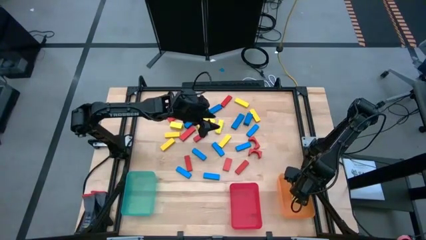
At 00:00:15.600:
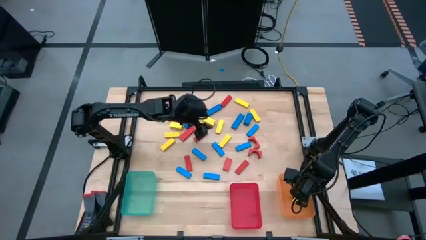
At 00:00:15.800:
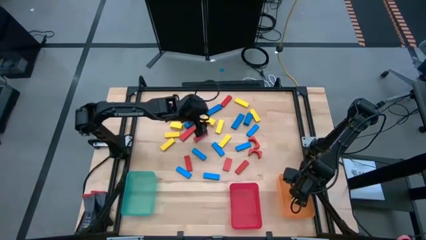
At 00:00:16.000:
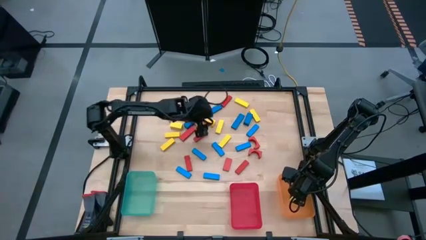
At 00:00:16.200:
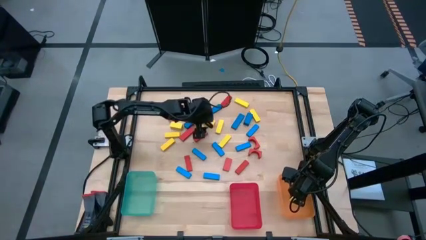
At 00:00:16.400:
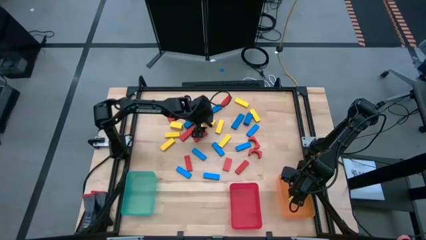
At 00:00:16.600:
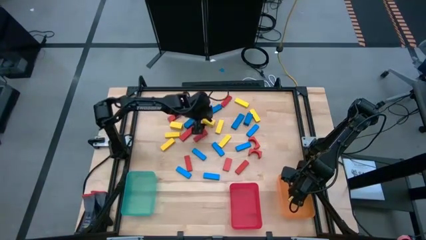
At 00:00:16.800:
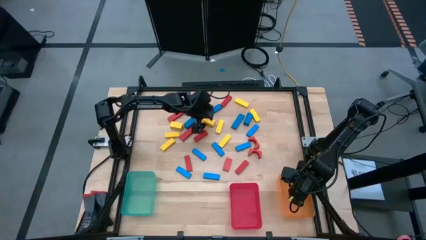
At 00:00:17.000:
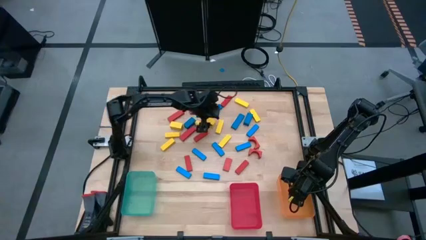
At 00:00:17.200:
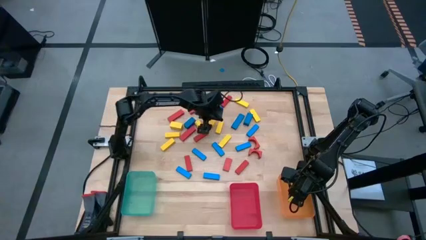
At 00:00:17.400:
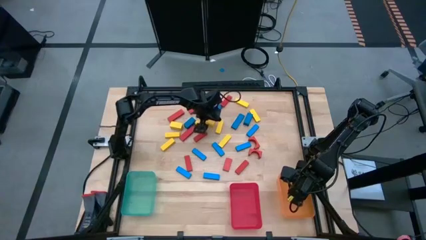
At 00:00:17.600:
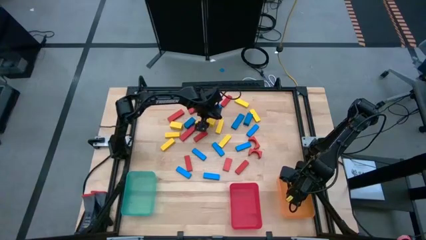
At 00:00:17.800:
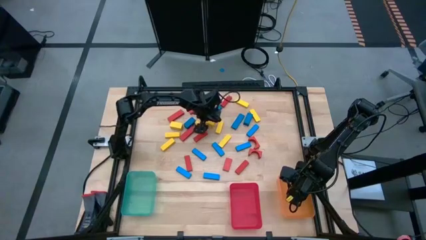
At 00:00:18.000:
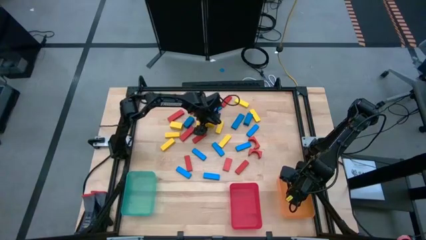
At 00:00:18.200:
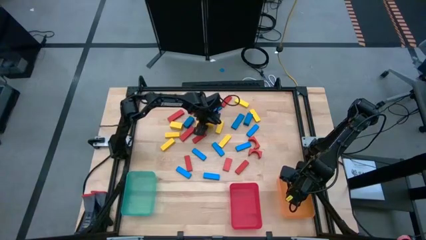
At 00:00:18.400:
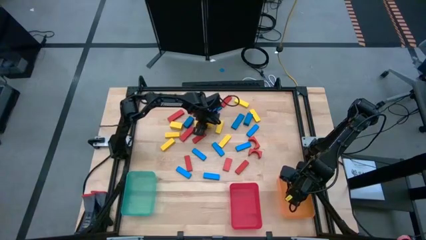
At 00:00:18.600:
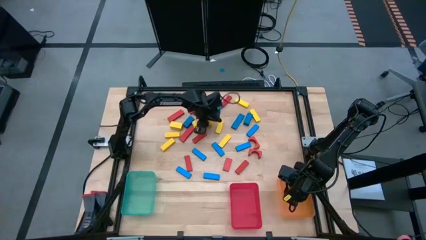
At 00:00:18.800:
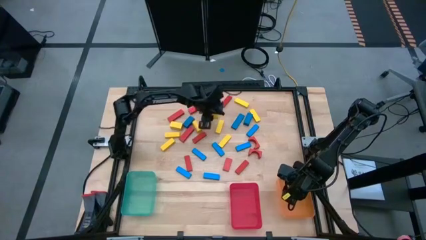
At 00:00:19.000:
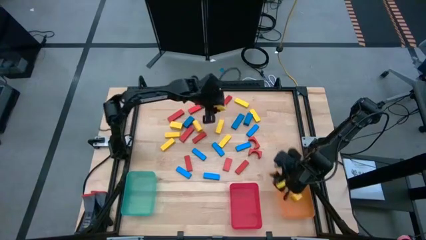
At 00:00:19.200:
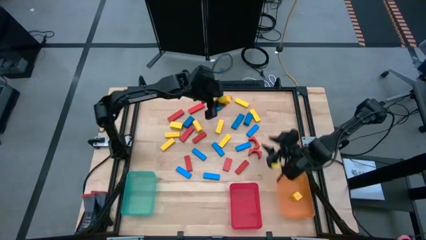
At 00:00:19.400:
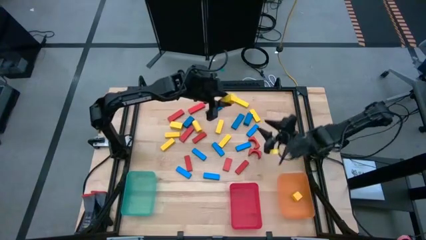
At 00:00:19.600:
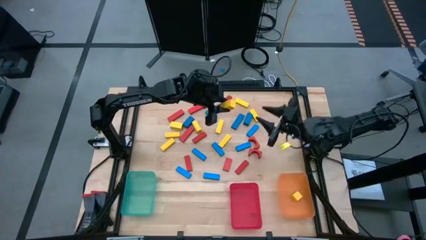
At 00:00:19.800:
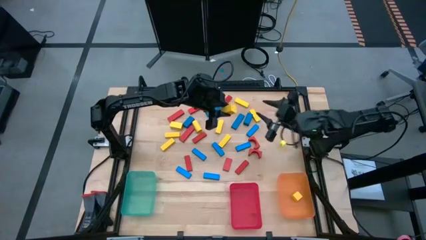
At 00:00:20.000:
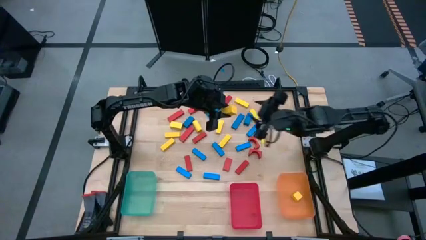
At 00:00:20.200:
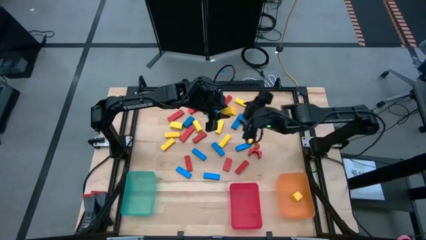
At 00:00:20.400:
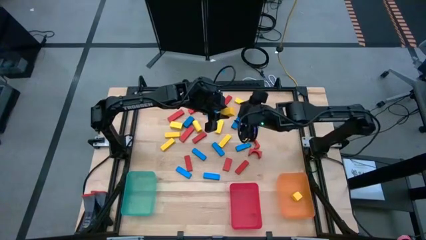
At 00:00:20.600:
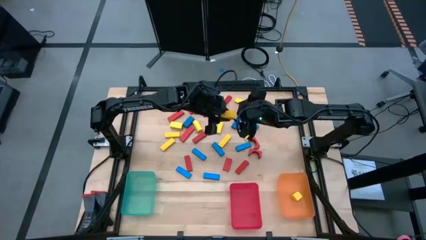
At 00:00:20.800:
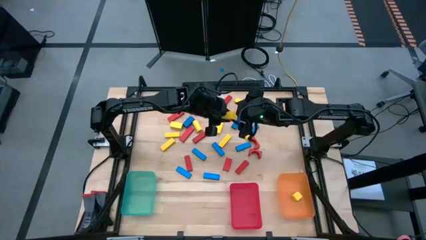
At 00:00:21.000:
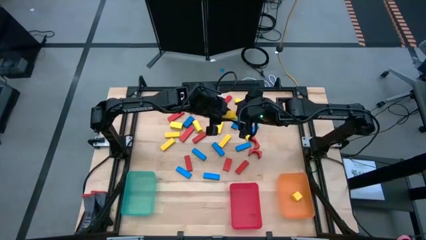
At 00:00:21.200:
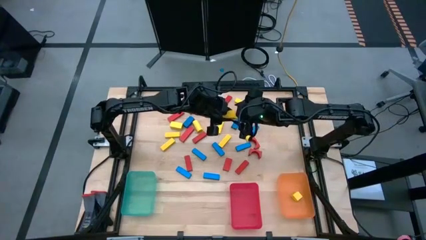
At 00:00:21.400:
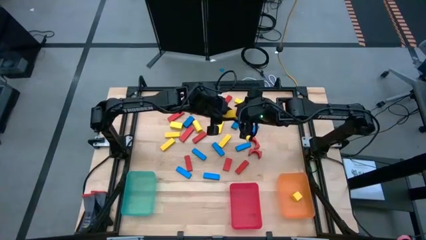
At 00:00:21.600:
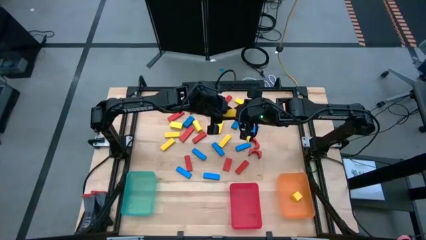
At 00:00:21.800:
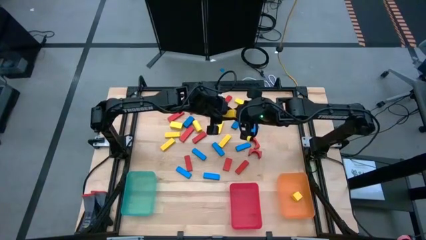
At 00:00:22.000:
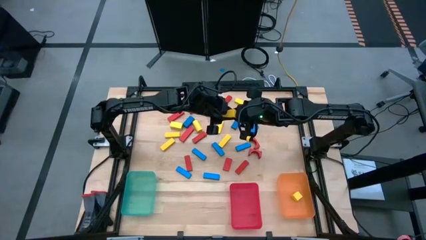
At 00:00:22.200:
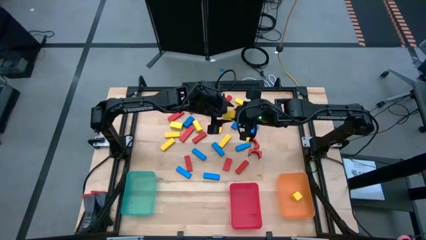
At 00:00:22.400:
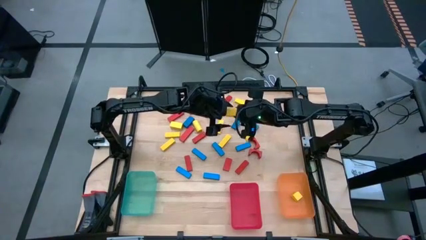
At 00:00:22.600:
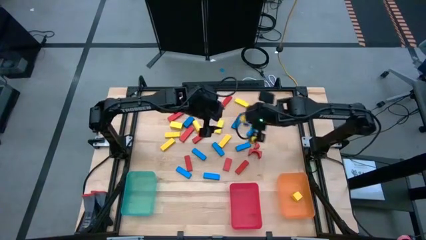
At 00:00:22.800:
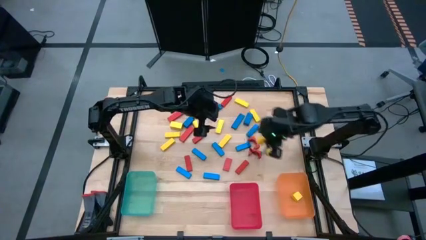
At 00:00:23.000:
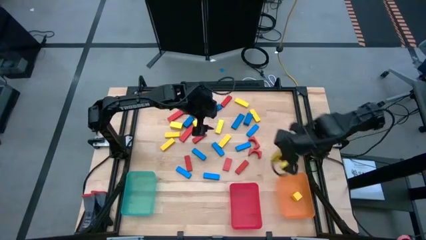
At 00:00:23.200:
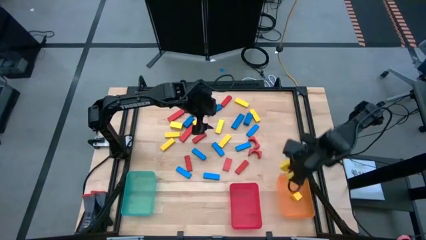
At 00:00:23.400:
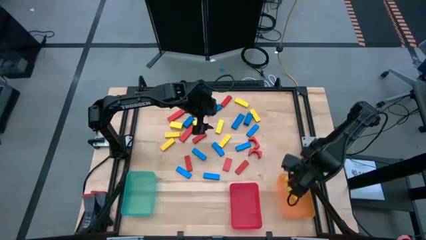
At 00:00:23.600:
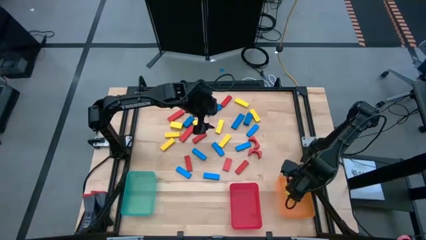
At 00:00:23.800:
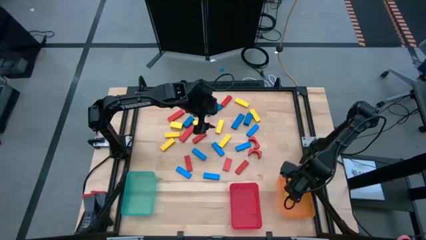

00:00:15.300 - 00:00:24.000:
Task: Sort blocks
Put the yellow block into the orange bin

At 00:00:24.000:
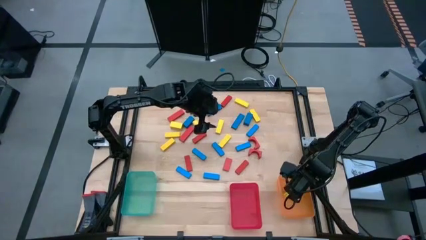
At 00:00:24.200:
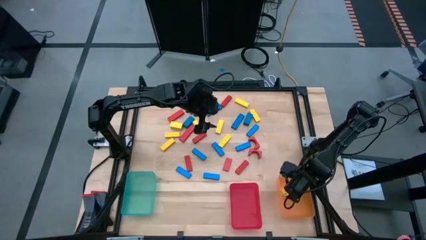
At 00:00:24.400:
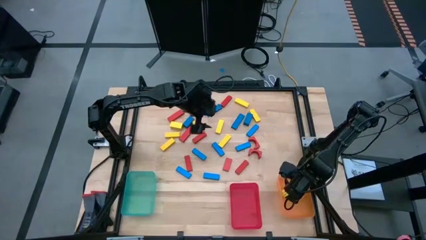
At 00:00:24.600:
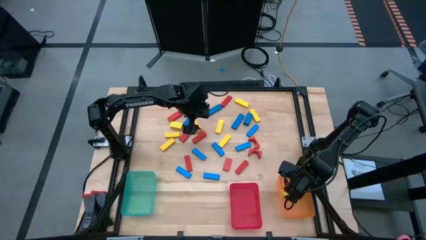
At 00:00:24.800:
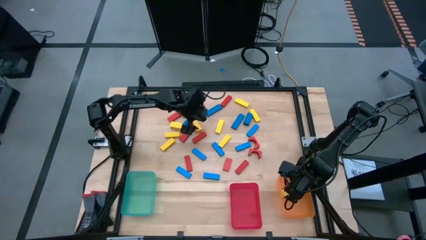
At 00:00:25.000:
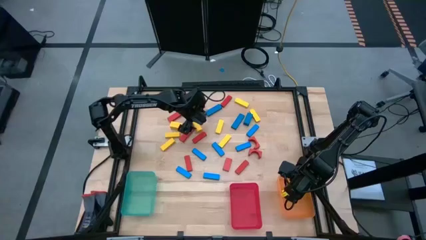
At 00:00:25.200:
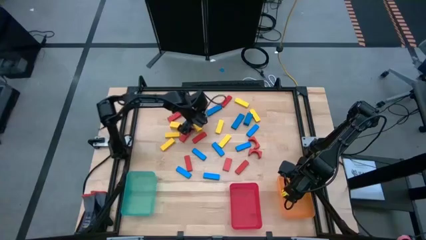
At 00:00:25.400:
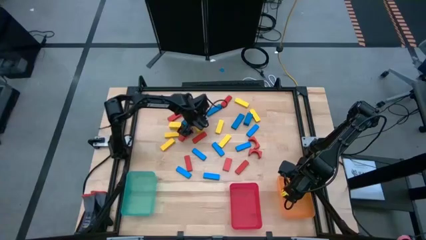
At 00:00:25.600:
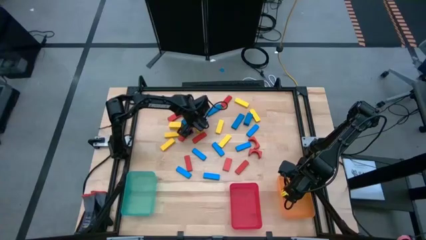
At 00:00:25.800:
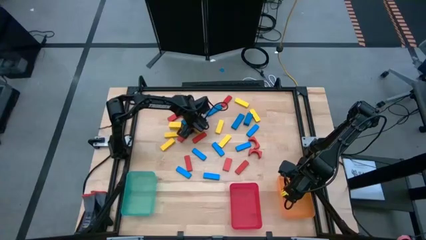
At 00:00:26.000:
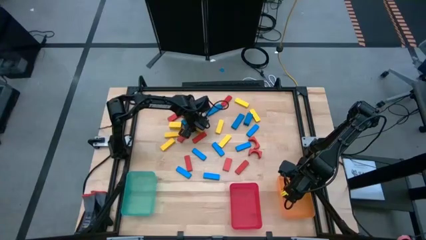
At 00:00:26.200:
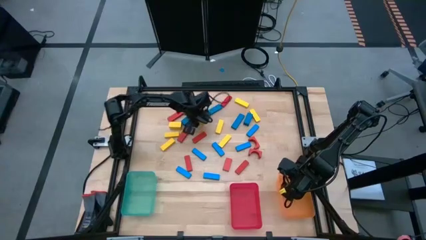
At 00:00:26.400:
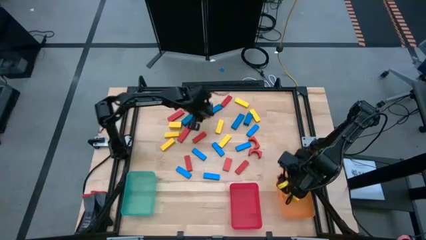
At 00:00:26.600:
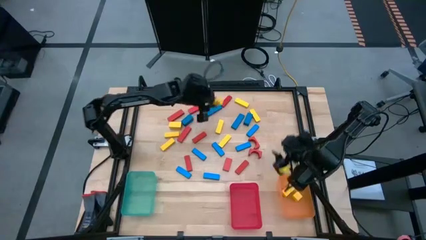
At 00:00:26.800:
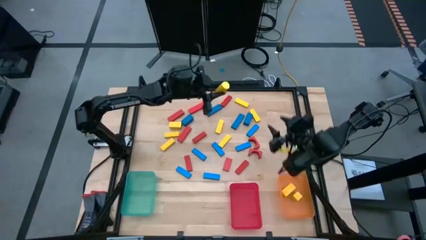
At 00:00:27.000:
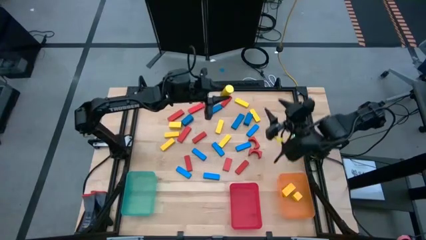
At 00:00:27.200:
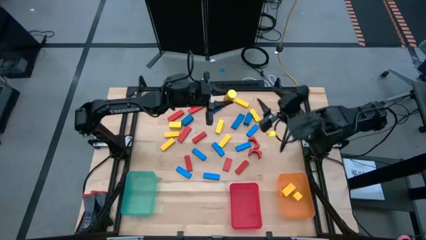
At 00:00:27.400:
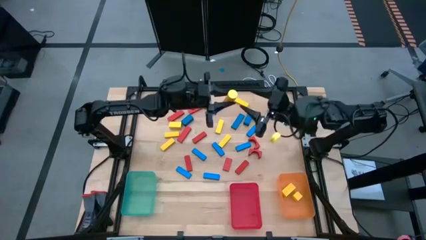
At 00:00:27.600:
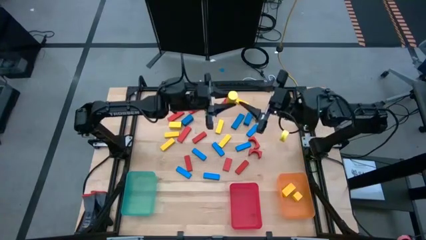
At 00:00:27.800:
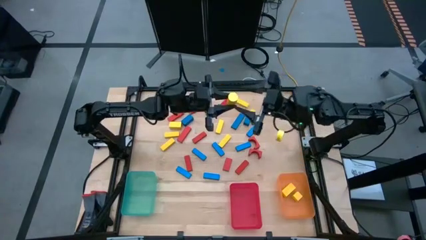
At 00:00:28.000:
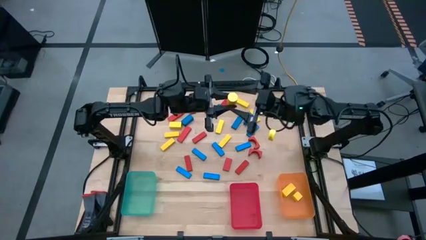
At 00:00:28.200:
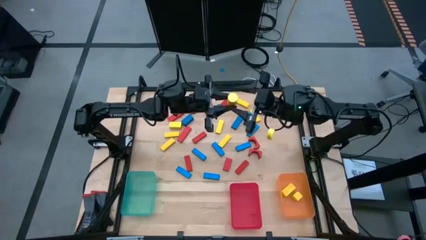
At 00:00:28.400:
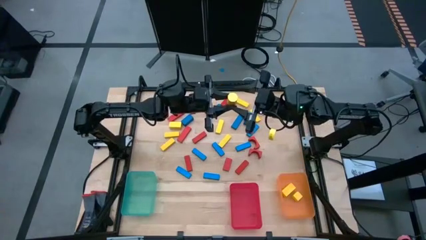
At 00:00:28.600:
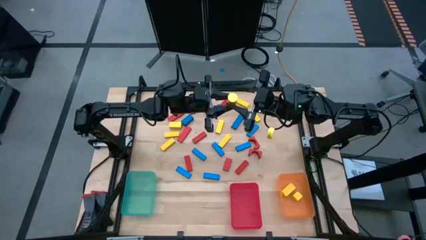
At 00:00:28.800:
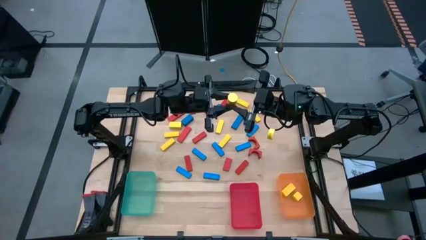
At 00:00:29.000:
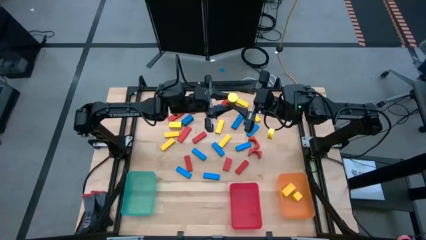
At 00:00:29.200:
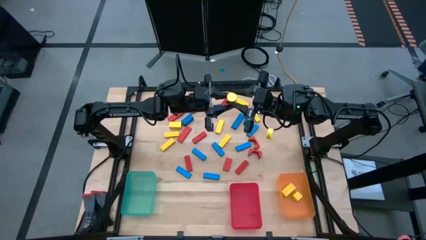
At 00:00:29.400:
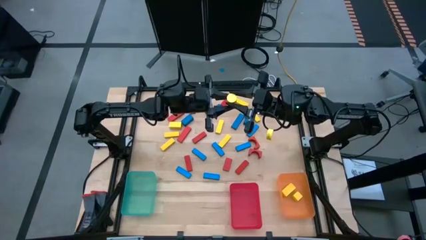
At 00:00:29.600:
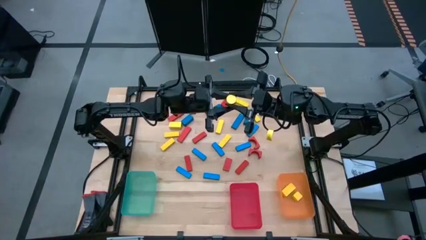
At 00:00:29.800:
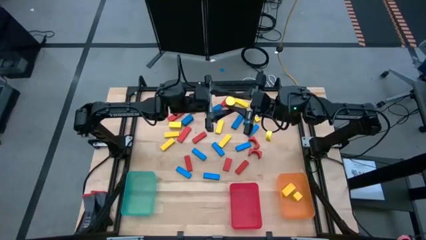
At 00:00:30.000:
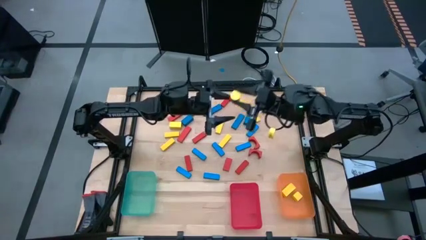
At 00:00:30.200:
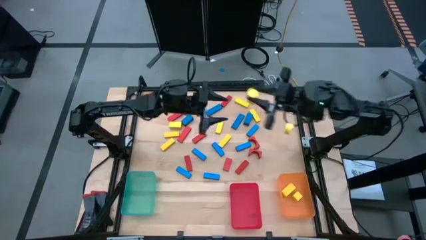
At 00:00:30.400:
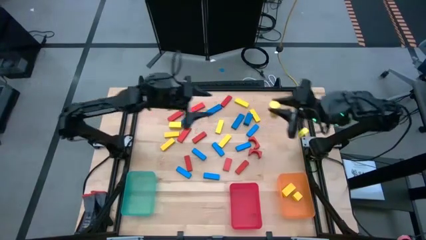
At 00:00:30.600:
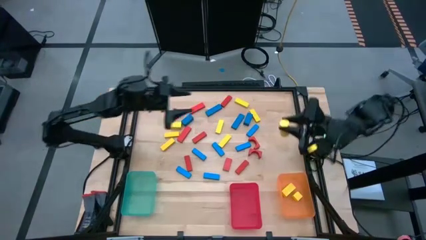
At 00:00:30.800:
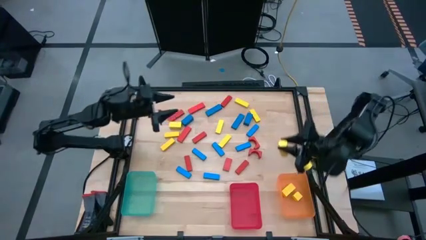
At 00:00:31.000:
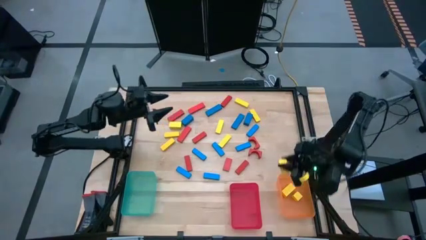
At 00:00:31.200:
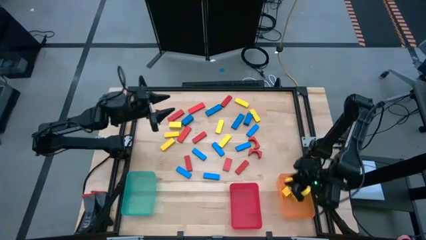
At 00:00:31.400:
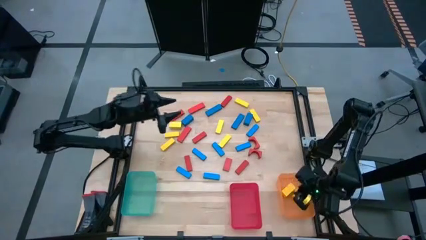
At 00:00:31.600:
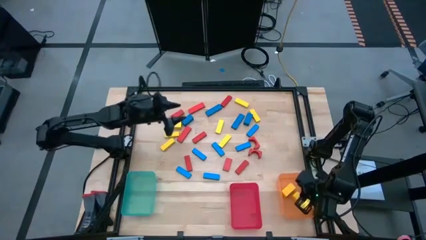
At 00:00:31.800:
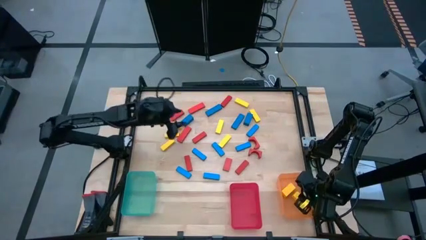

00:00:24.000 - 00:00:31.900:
Put the yellow block into the orange bin
